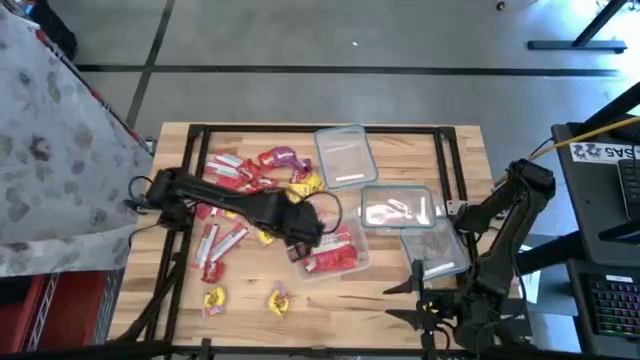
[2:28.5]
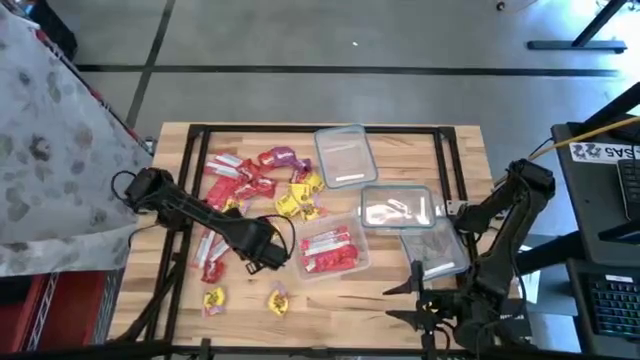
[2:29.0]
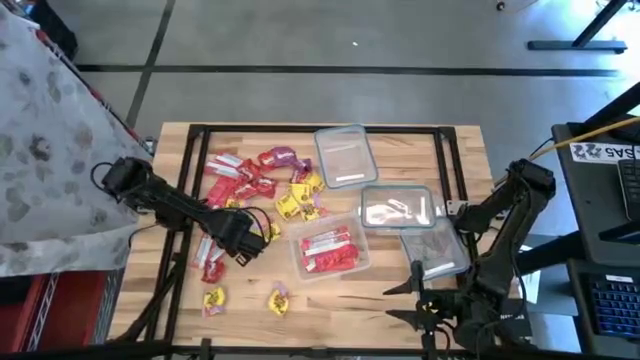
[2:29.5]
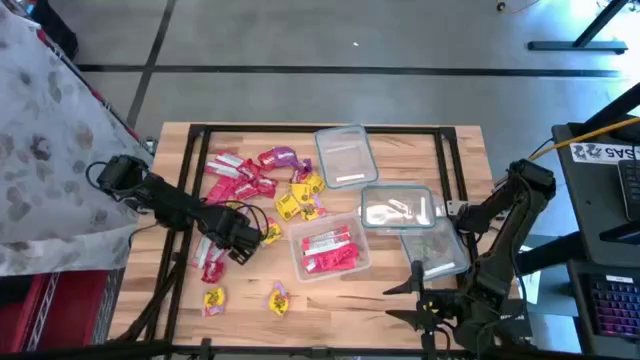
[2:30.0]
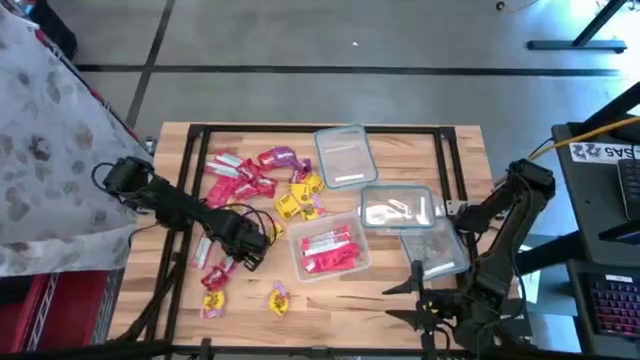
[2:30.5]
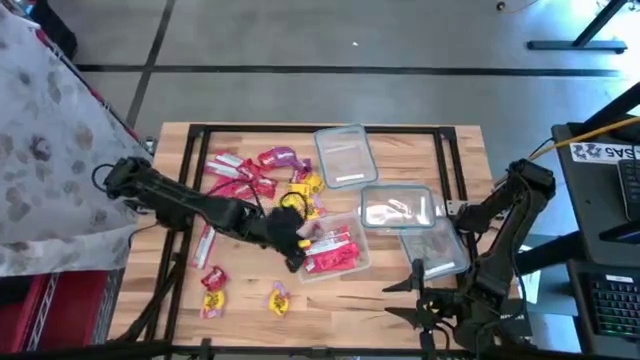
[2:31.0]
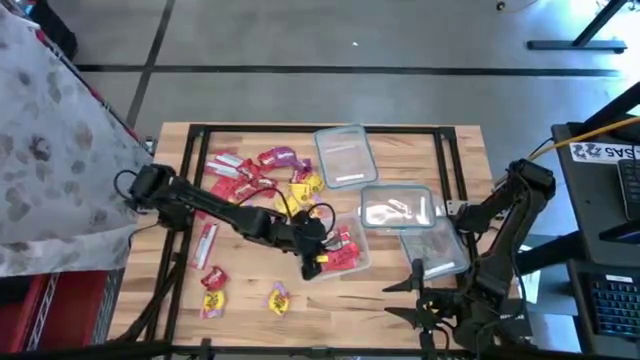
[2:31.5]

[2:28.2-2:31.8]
Task: Sort candy
Put the pink candy into the top rectangular transparent food container

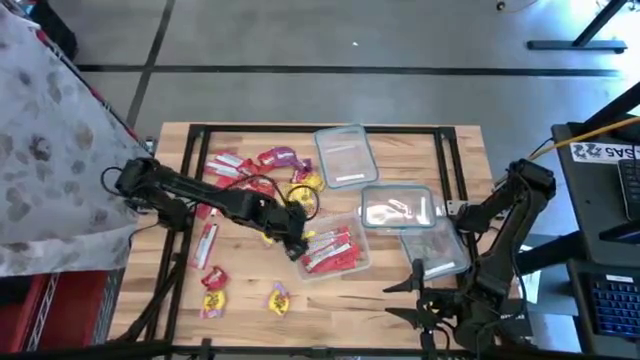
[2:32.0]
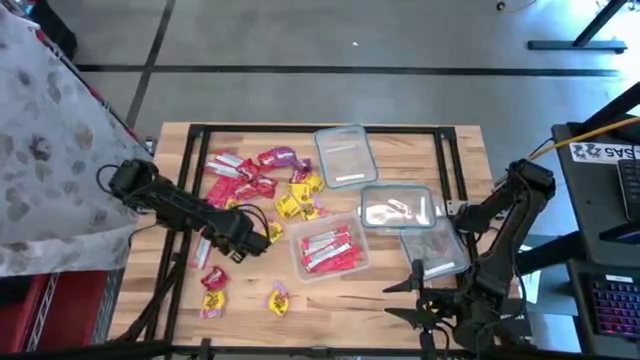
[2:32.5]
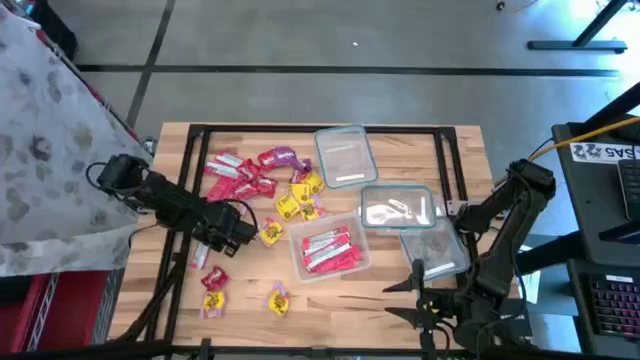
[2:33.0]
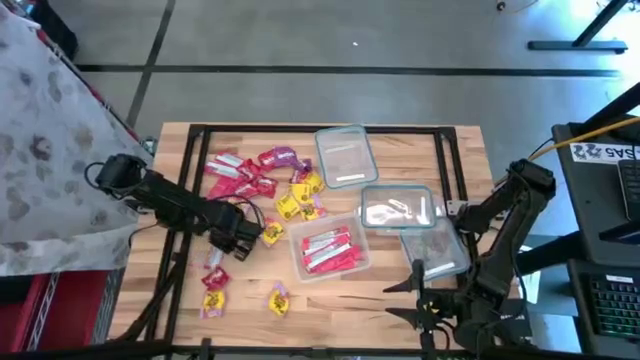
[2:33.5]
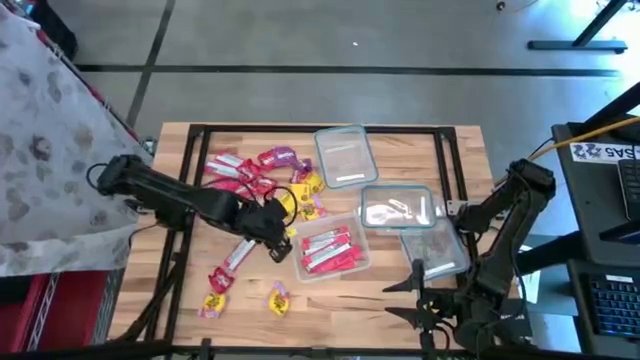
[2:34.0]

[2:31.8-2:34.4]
Put the pink candy into the top rectangular transparent food container

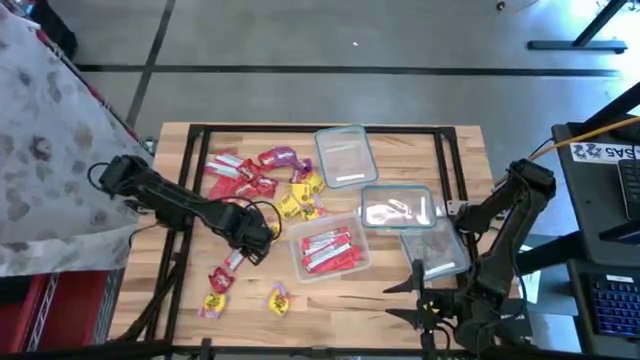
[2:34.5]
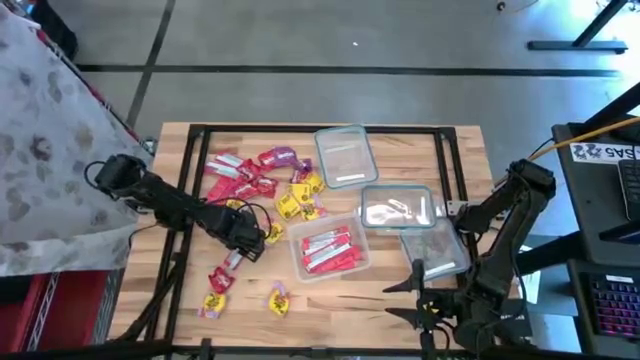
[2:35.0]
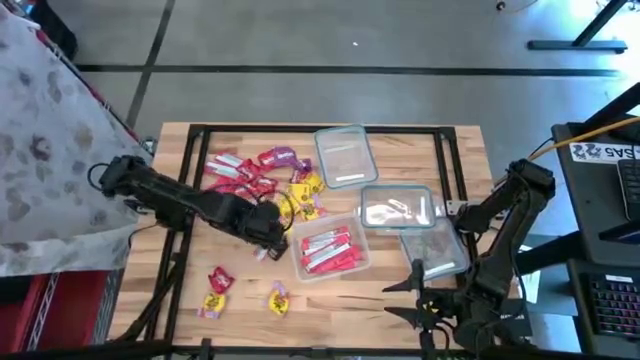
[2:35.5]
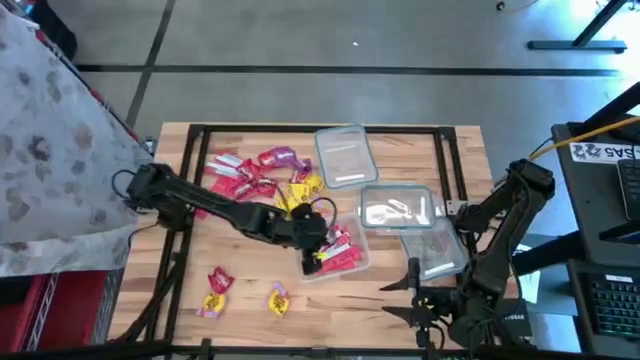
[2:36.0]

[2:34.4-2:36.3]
Put the pink candy into the top rectangular transparent food container

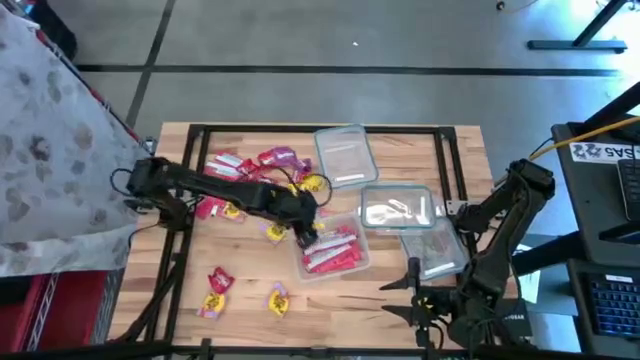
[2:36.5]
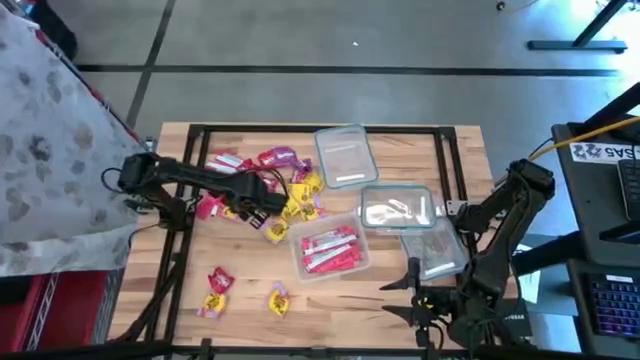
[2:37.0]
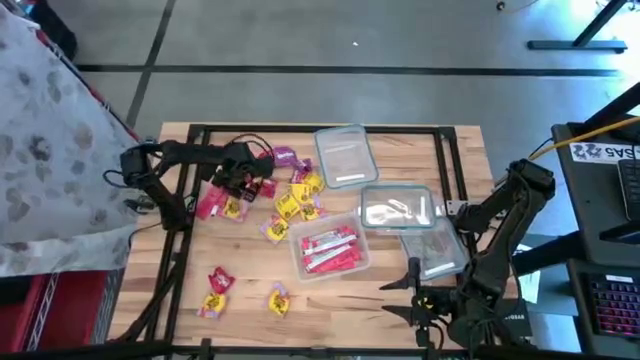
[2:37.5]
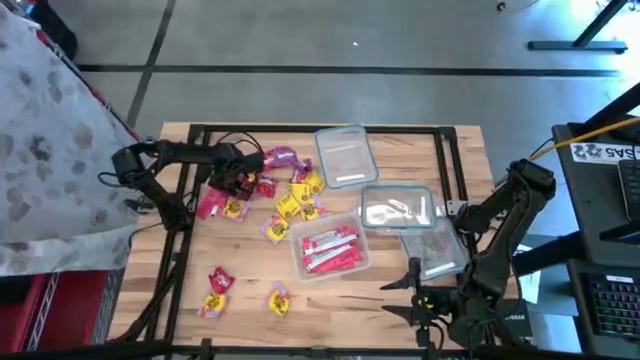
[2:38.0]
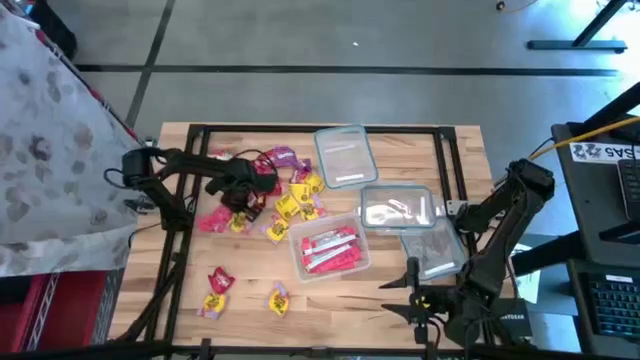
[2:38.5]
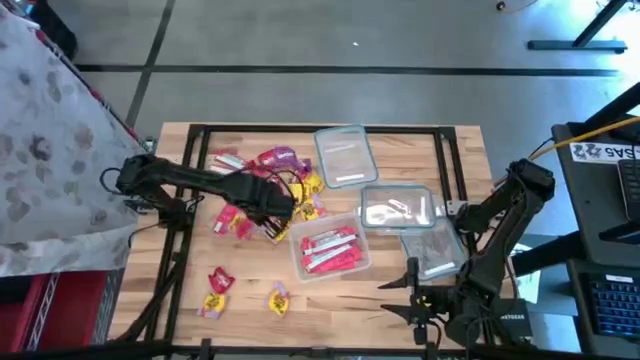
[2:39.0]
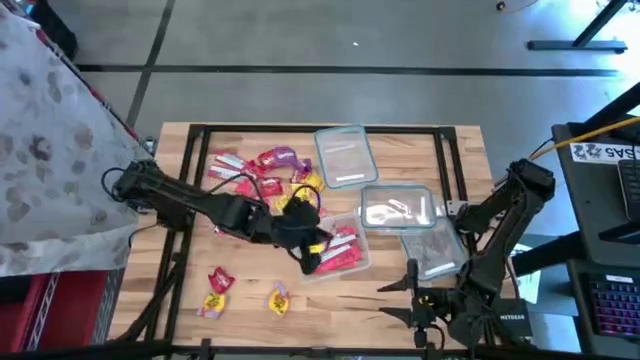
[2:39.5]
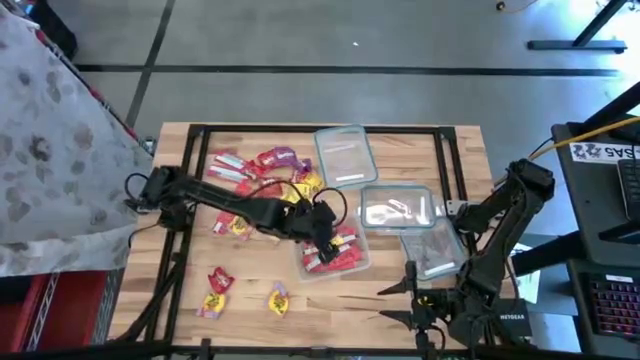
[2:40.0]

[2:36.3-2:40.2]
Put the pink candy into the top rectangular transparent food container

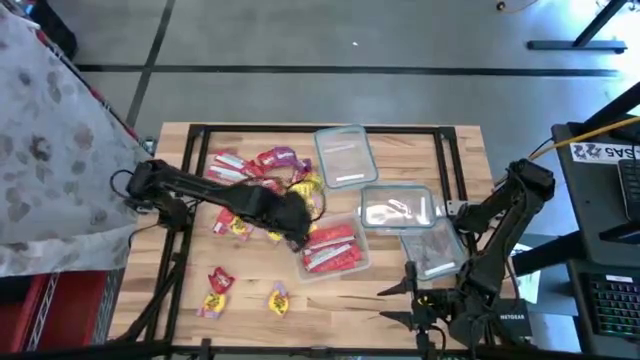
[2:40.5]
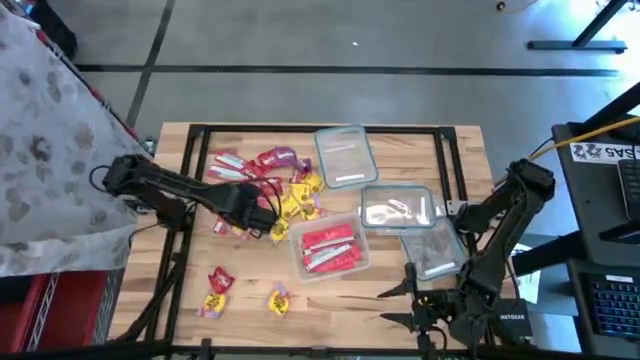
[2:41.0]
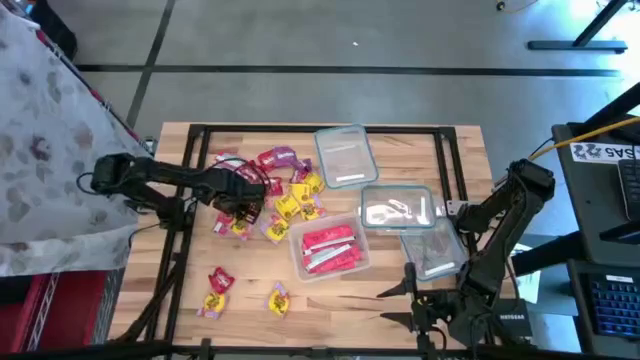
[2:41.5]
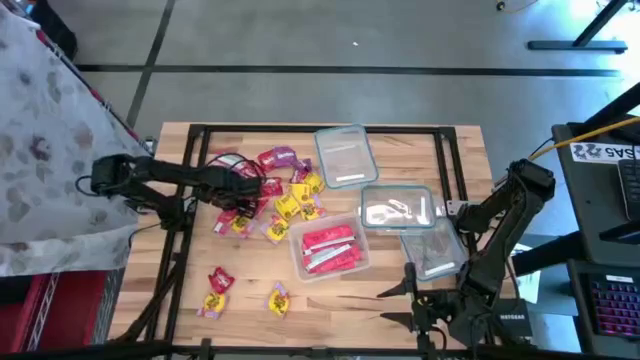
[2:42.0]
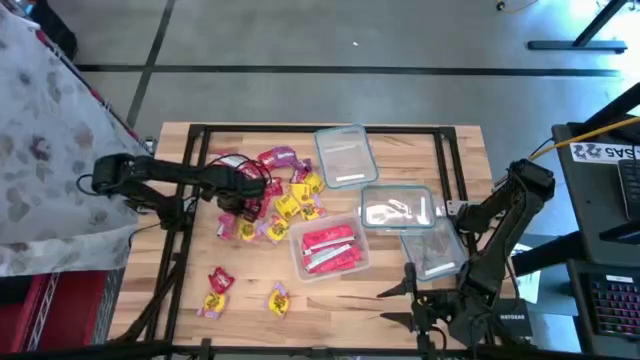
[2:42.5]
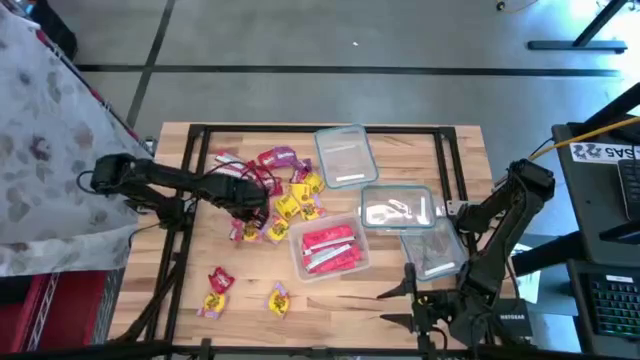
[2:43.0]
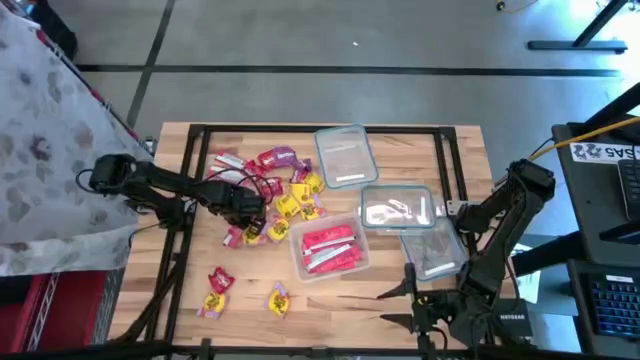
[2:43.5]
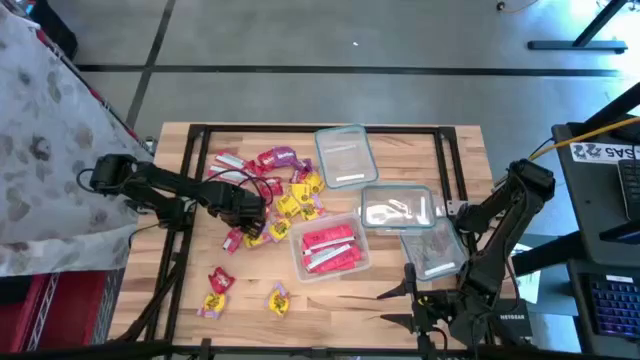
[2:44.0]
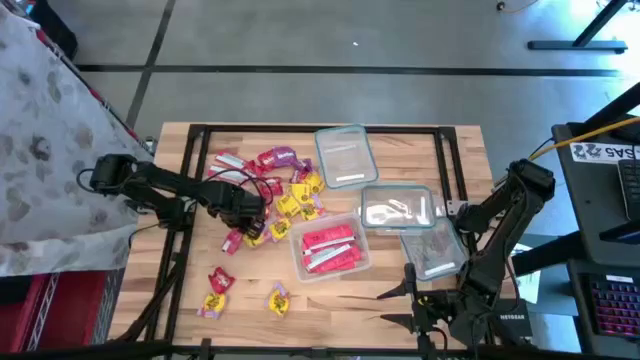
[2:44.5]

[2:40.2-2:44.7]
Put the pink candy into the top rectangular transparent food container

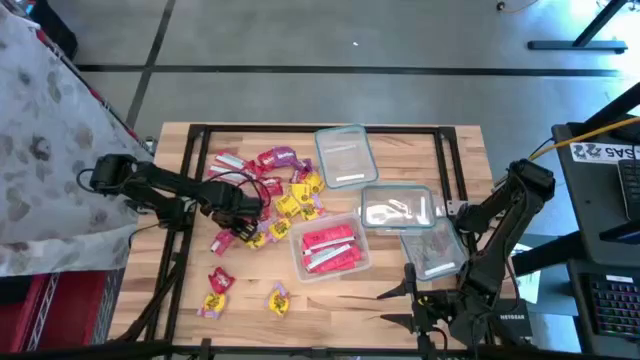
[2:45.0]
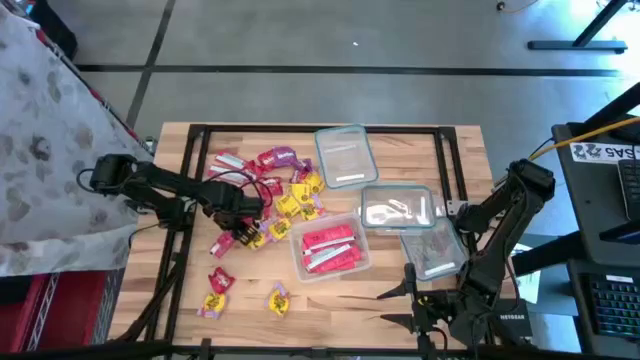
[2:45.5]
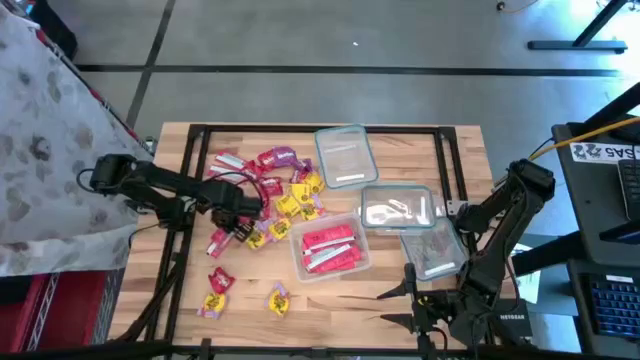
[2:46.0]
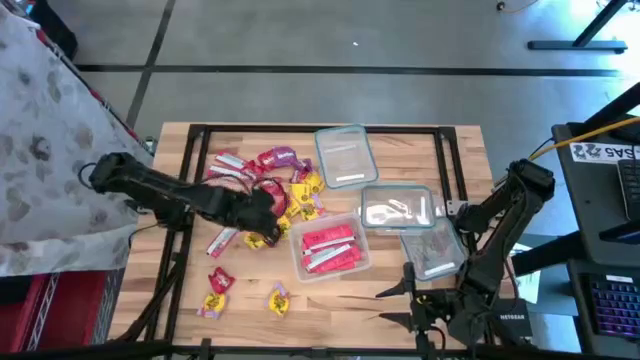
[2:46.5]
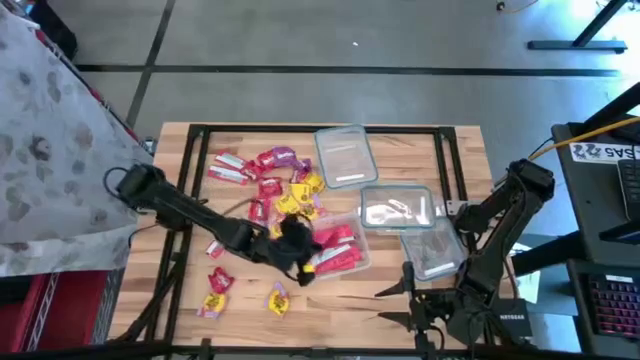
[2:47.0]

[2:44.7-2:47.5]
Put the pink candy into the top rectangular transparent food container

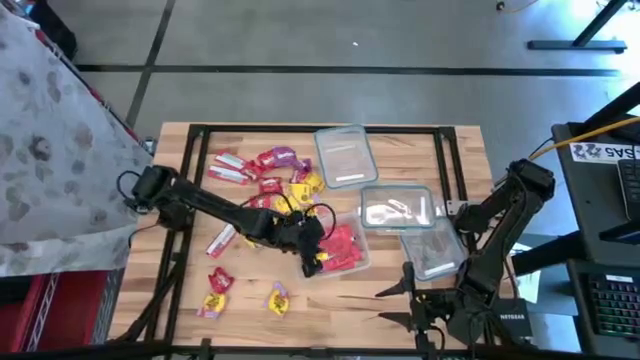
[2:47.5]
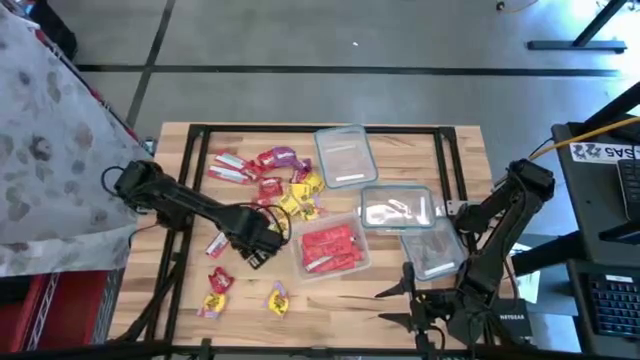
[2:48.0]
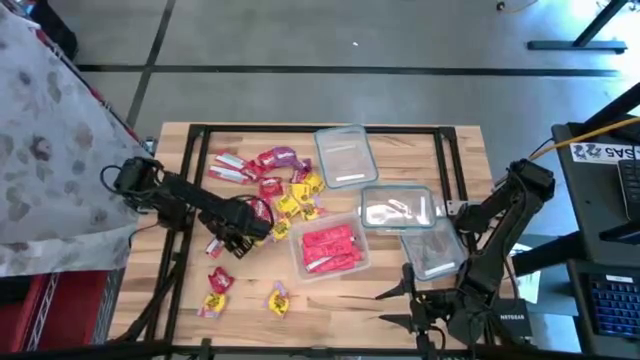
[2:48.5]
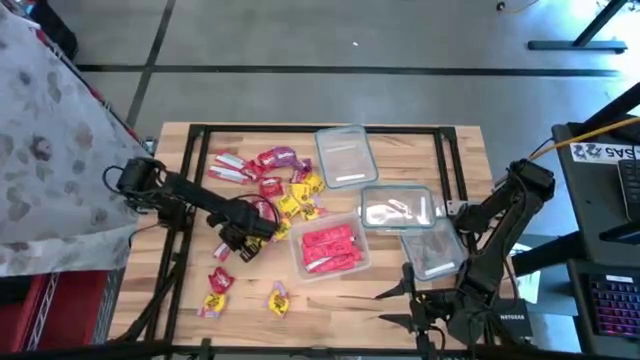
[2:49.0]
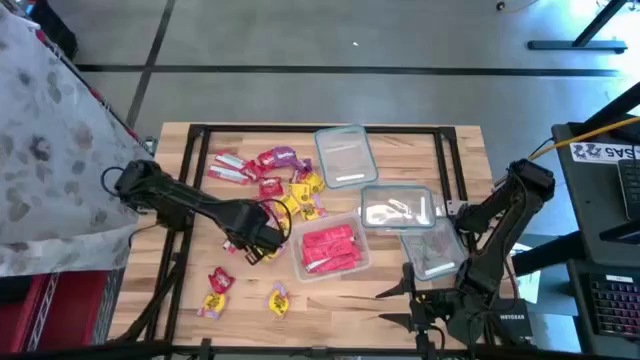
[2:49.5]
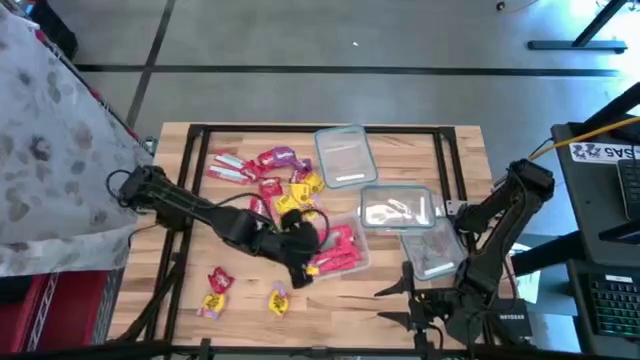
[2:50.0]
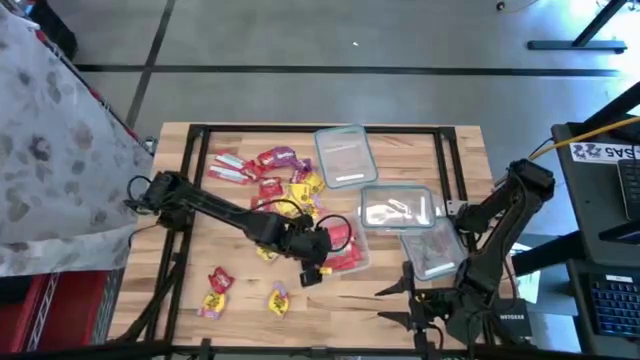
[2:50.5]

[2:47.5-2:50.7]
Put the pink candy into the top rectangular transparent food container
